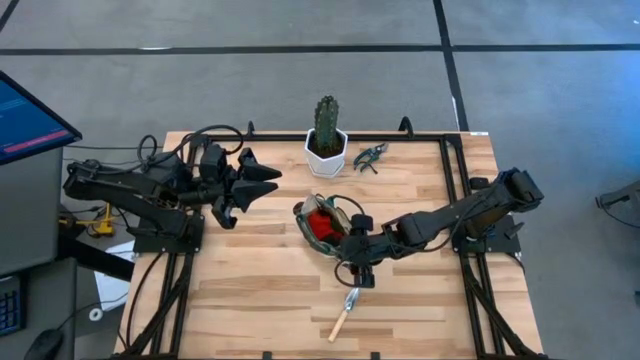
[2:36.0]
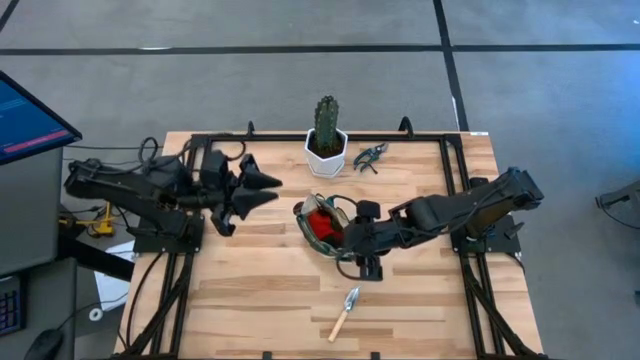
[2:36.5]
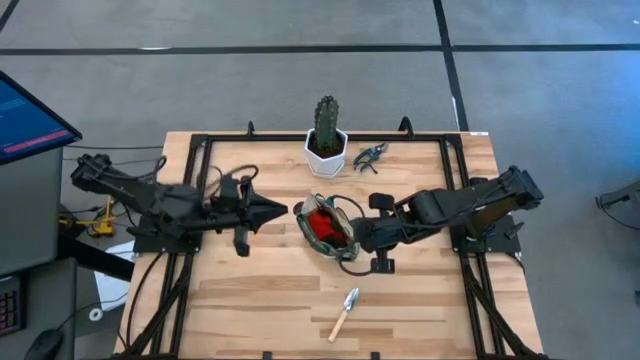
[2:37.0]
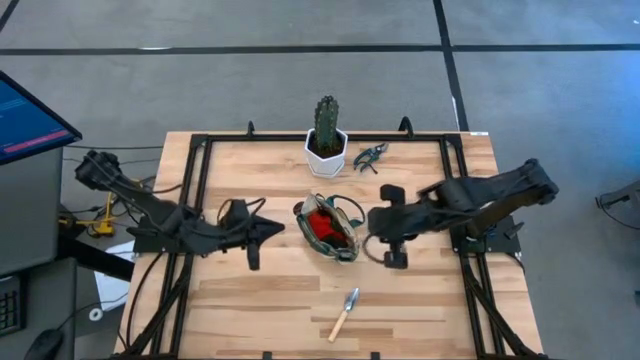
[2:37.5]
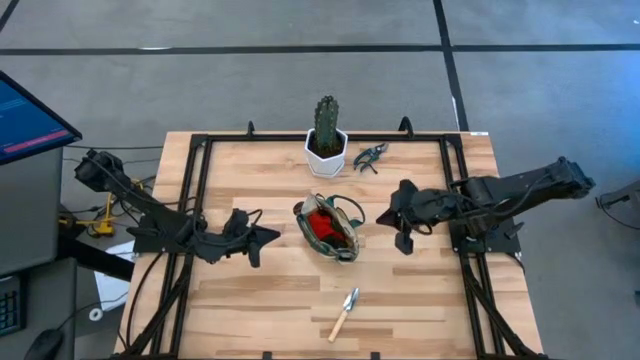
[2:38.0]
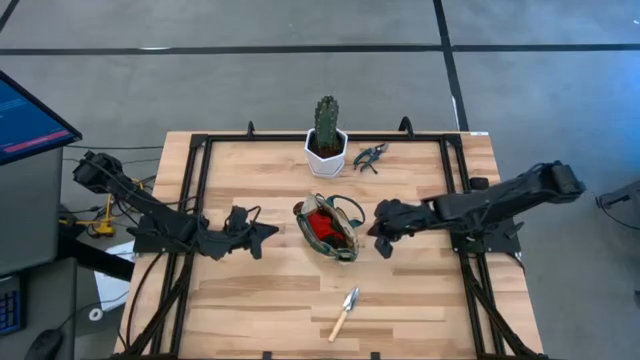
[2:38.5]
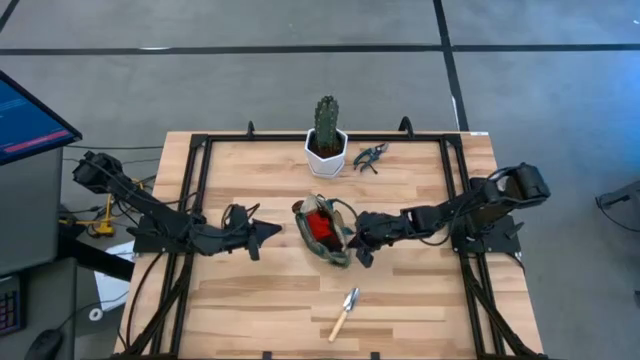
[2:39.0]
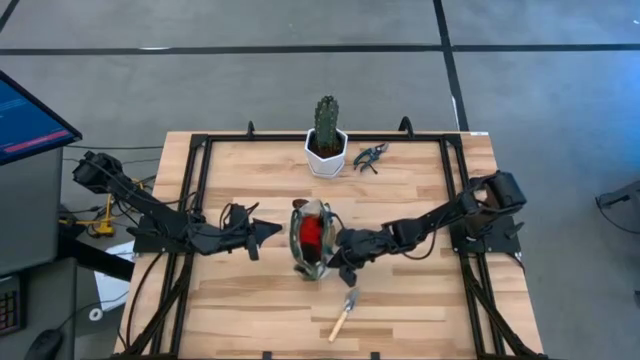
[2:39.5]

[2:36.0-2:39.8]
Task: Pick & Place Garden tools in Gardening bag
Adjust the gardening bag

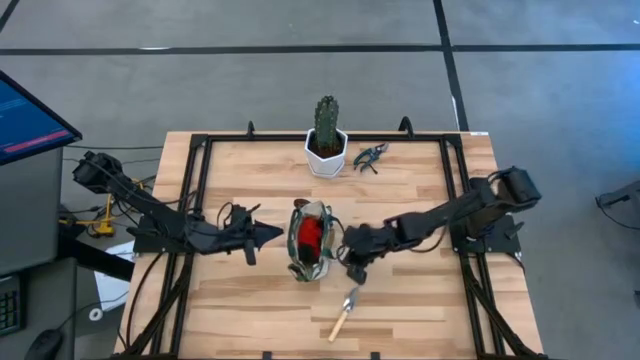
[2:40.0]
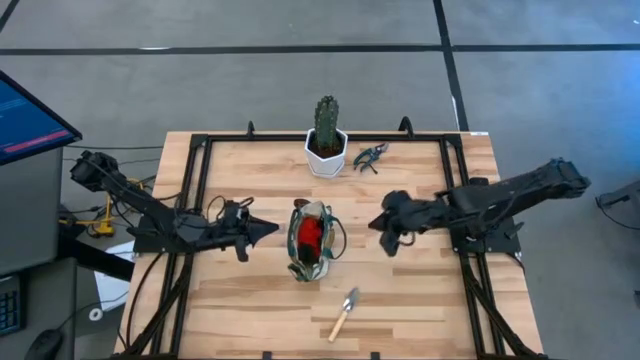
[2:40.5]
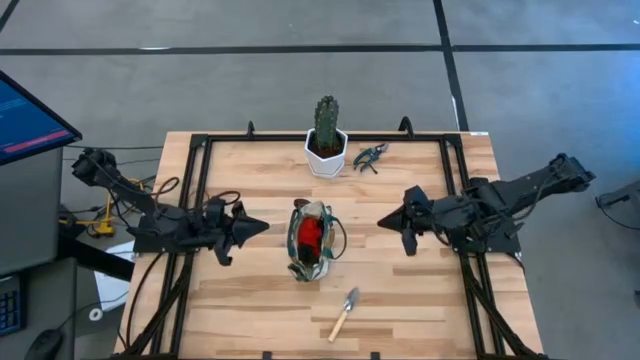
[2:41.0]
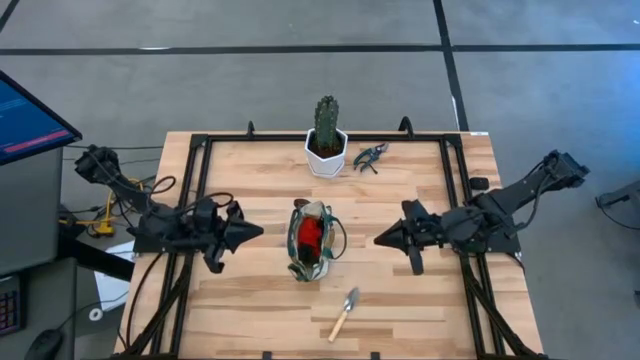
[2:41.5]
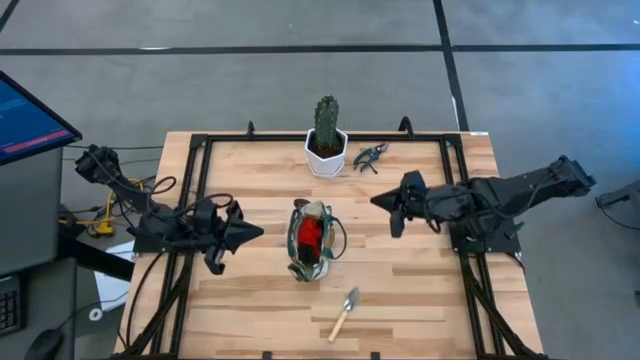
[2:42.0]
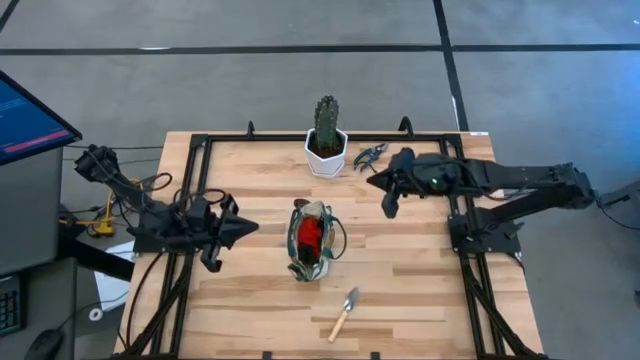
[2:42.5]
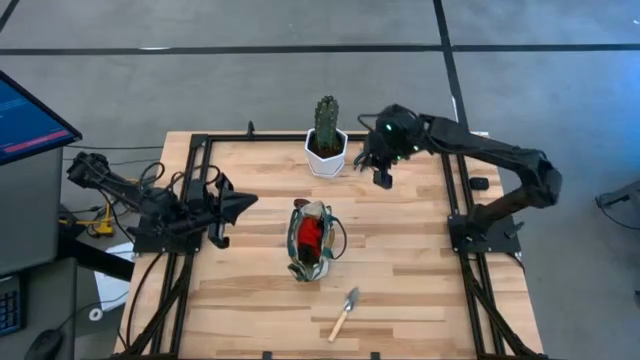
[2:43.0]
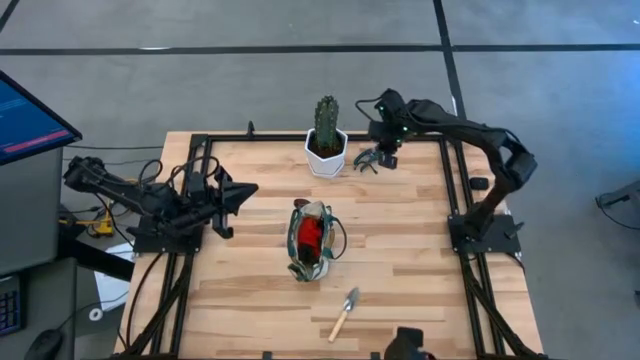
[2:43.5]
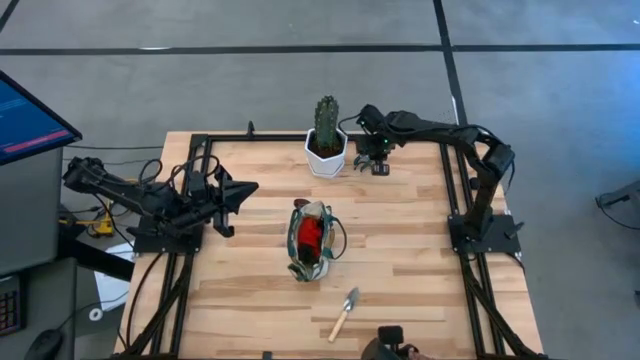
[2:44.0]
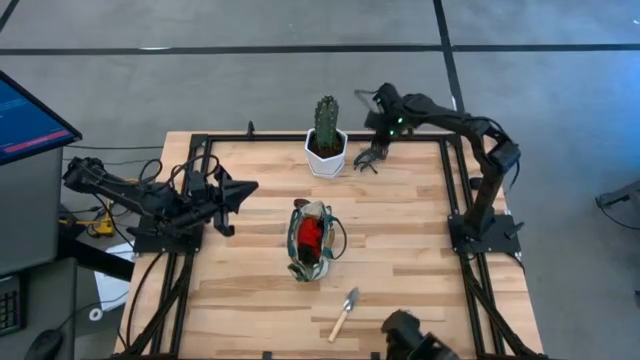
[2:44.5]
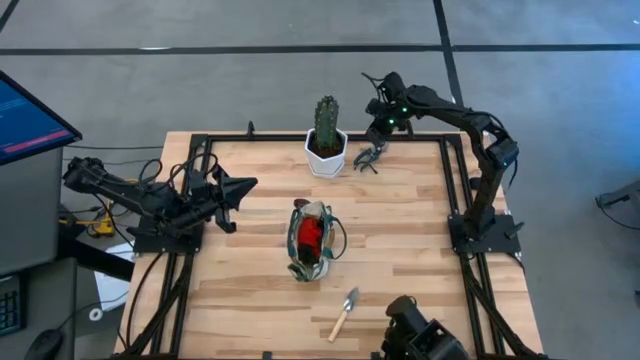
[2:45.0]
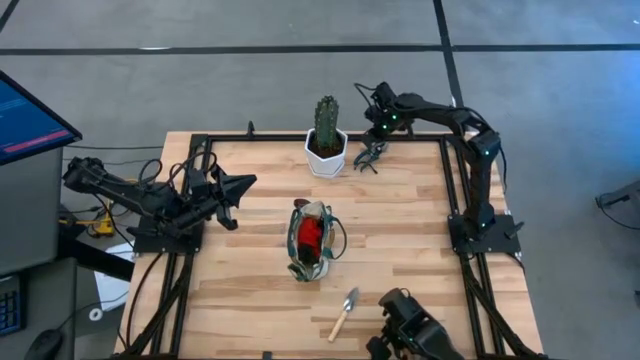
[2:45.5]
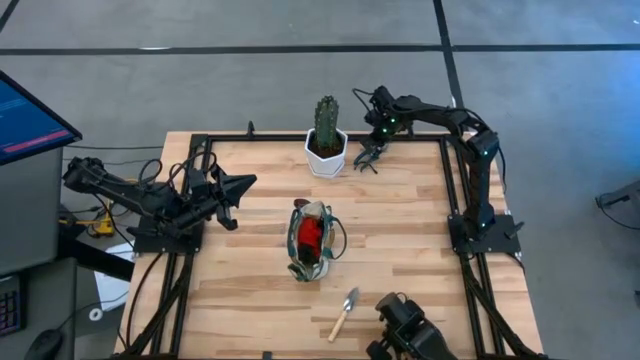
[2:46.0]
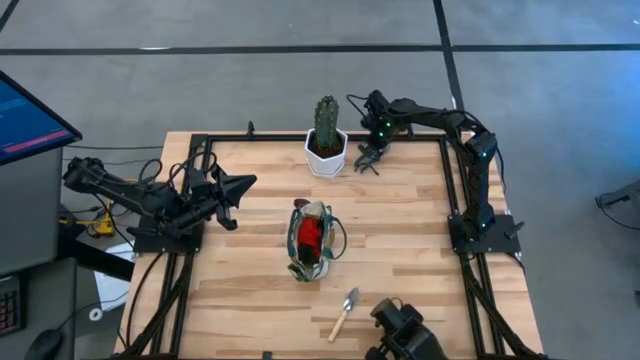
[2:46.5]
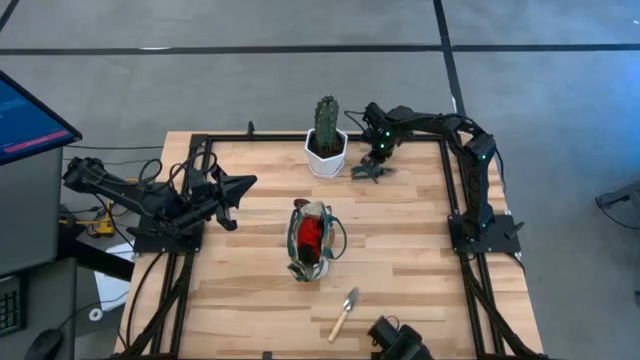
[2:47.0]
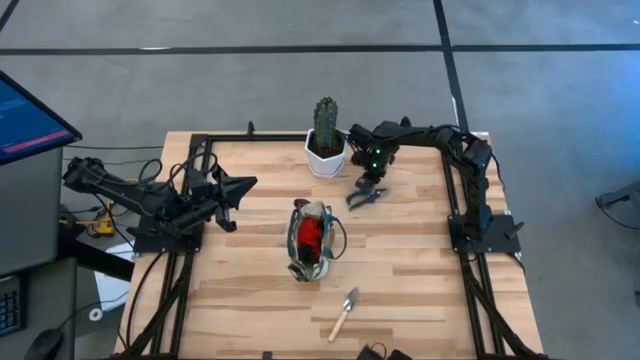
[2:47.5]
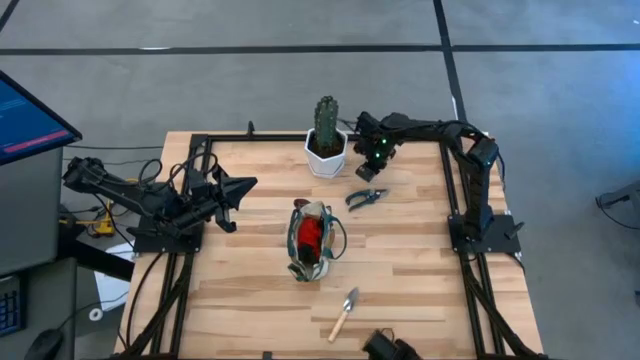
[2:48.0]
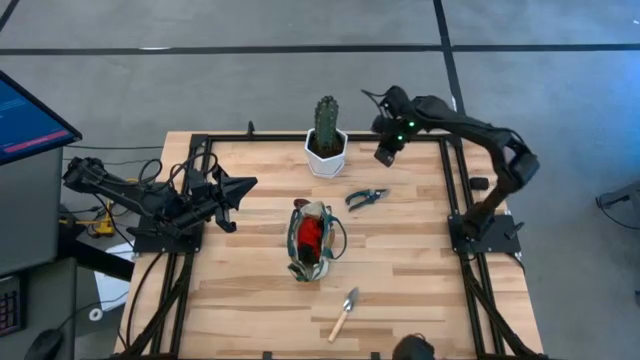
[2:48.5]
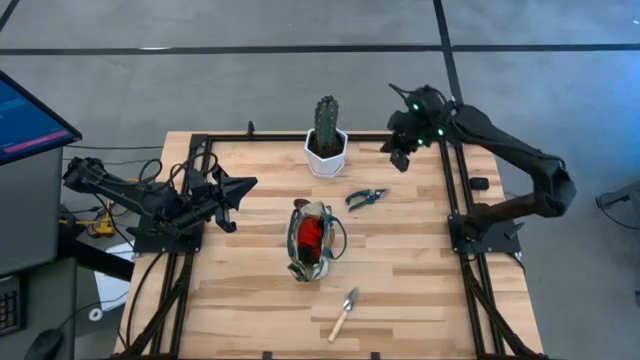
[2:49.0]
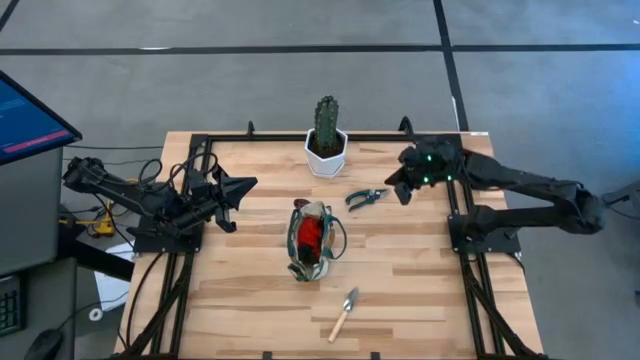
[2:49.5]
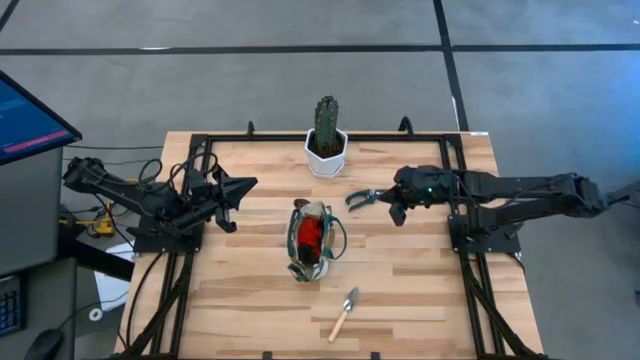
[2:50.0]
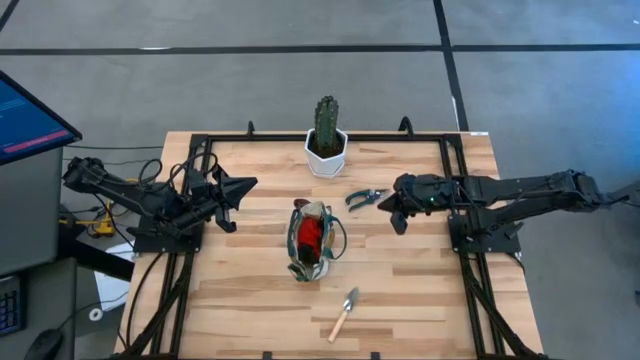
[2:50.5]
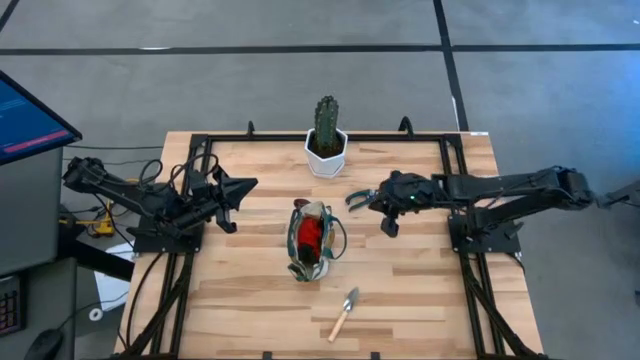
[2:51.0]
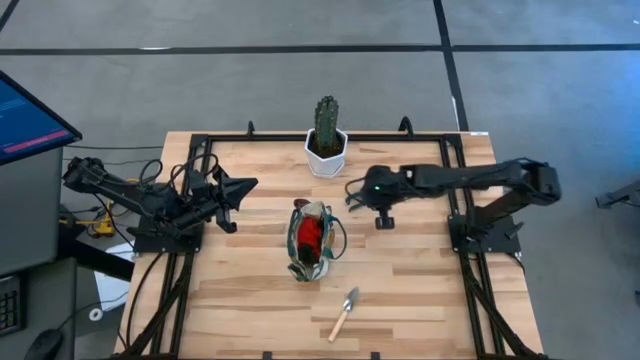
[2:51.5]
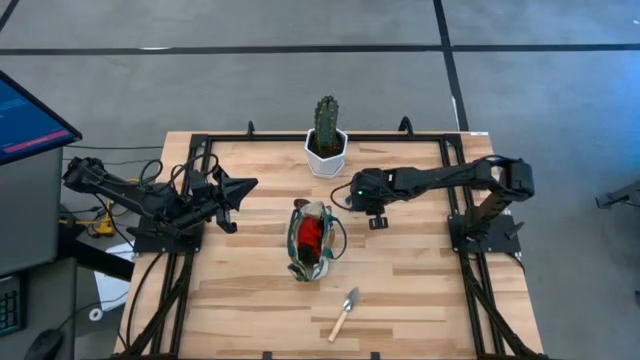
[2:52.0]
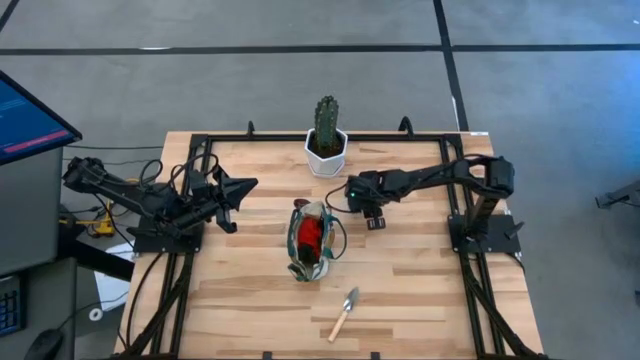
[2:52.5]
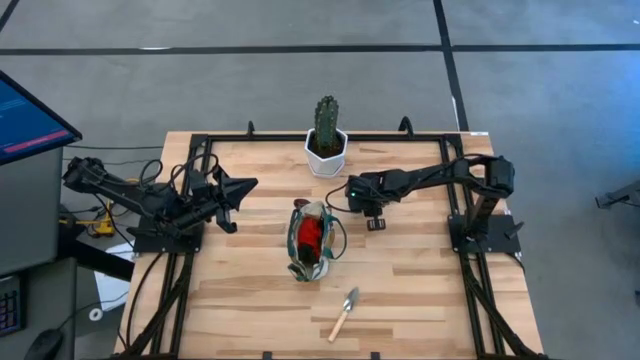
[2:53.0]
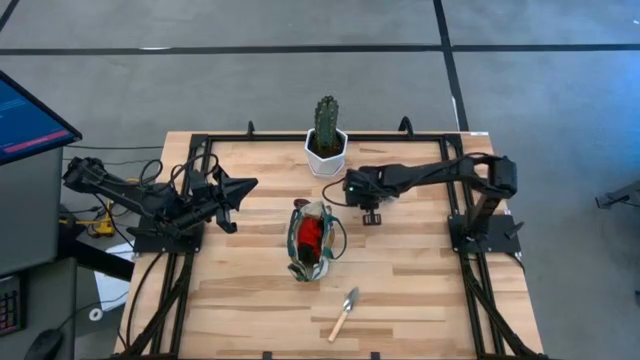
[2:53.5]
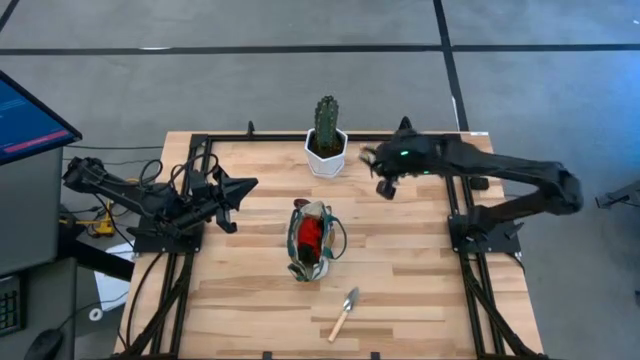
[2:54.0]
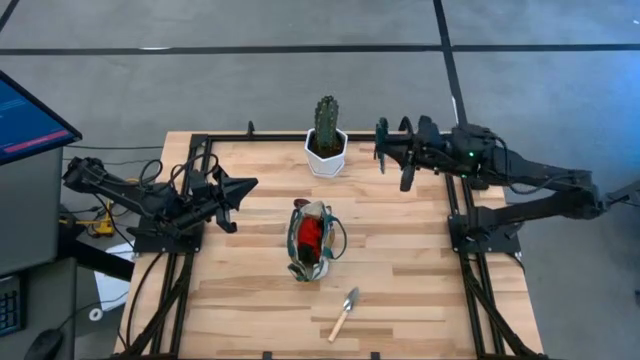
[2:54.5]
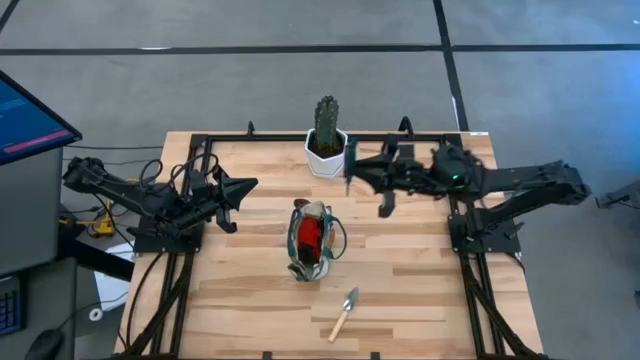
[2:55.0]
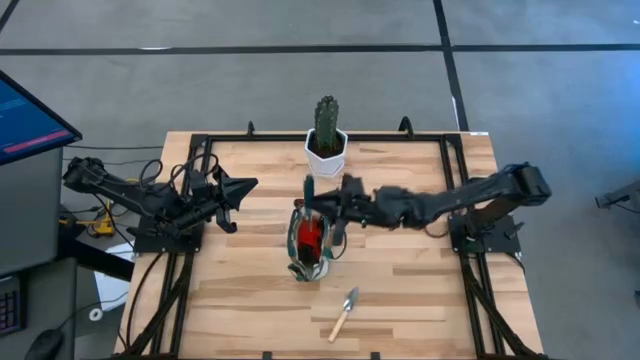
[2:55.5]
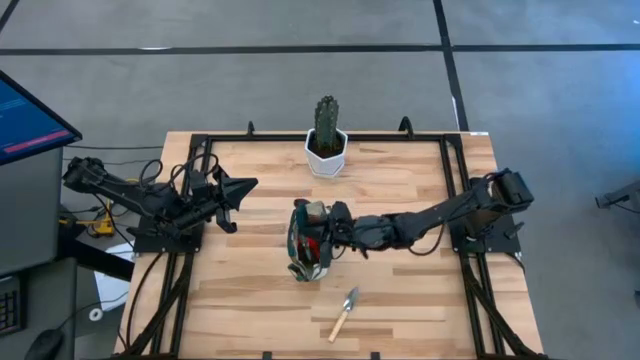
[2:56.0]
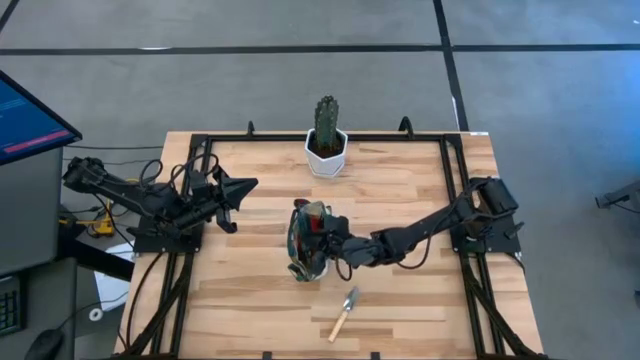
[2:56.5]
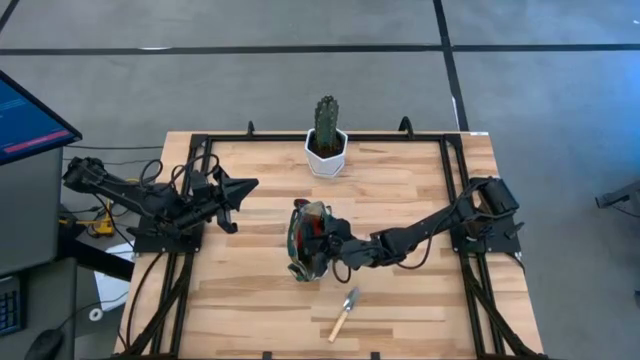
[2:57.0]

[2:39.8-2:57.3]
Put the green shear scissors into the gardening bag

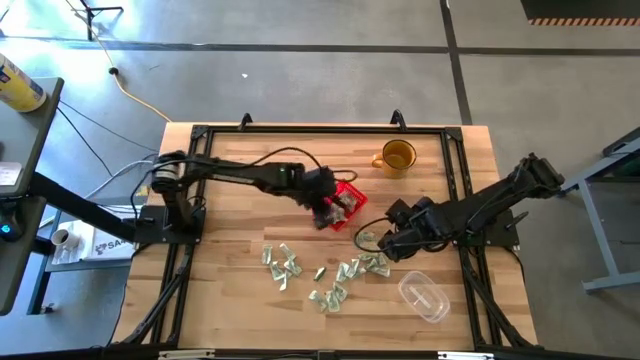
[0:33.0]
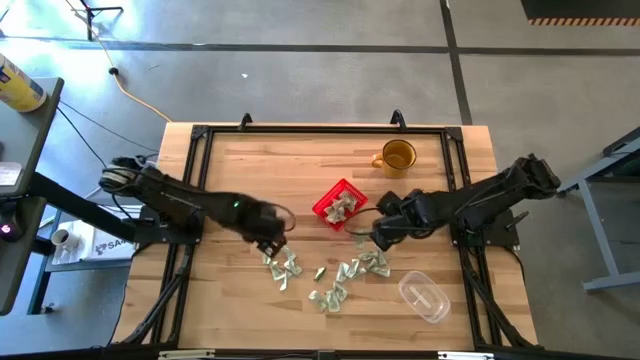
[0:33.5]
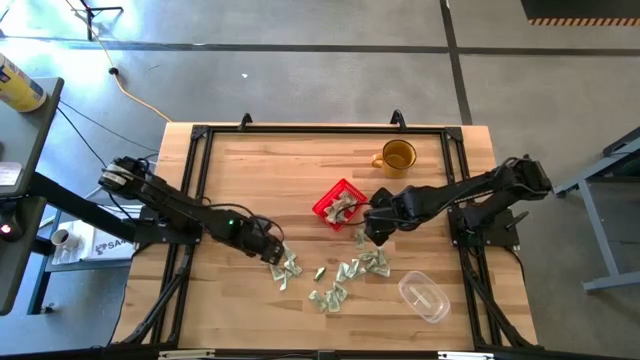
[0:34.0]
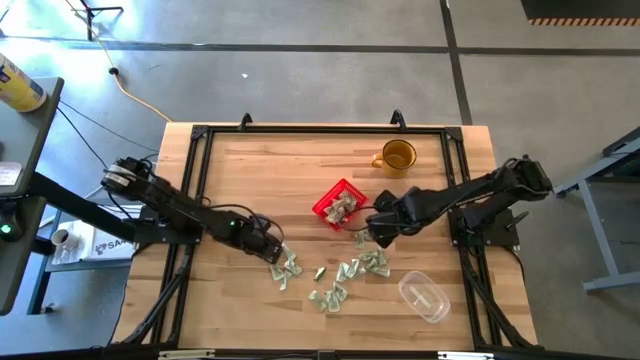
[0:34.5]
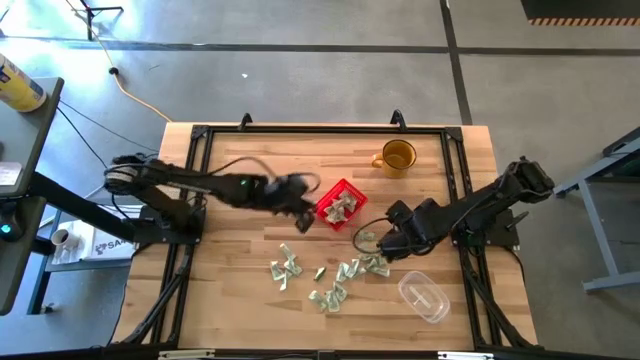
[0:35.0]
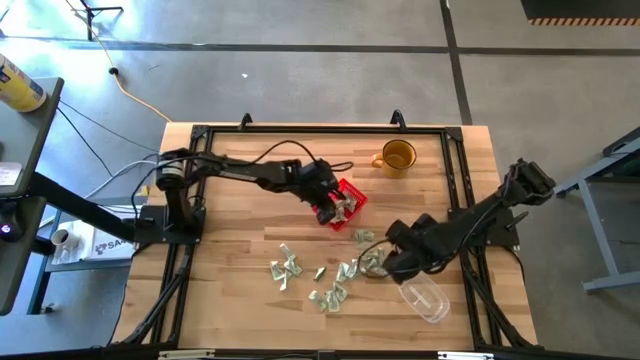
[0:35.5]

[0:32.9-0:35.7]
Task: Pick and place items into bin
Put the white stevia packet into the red bin
